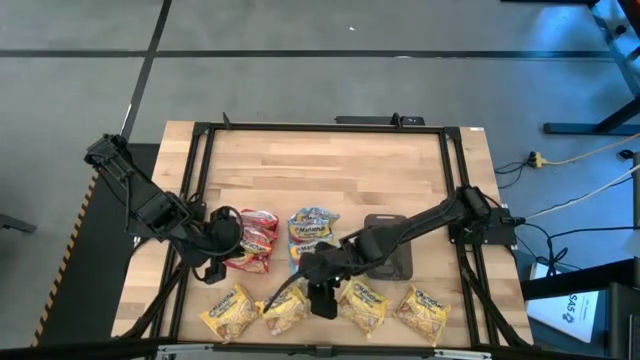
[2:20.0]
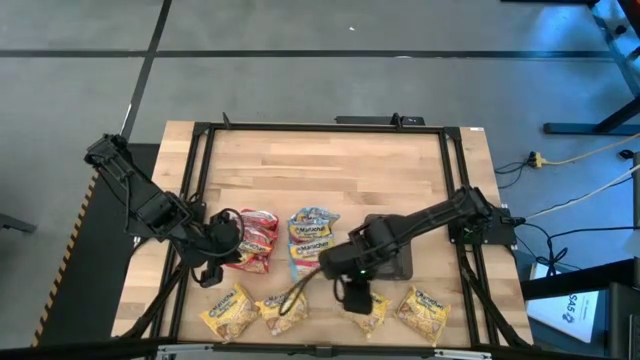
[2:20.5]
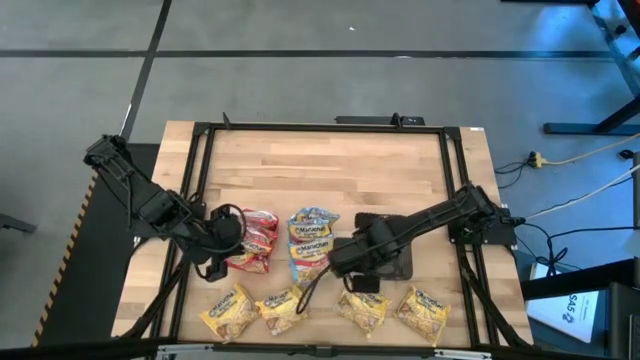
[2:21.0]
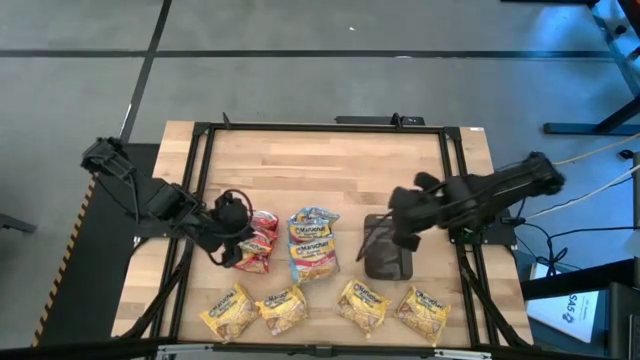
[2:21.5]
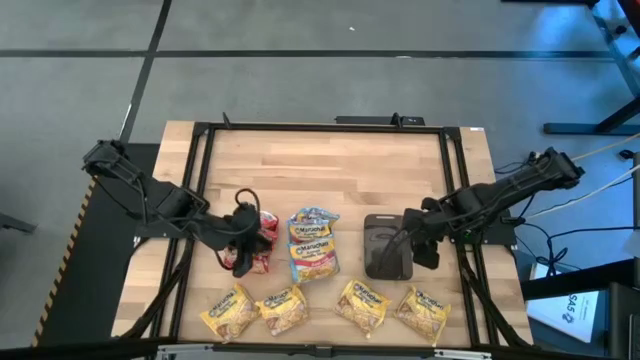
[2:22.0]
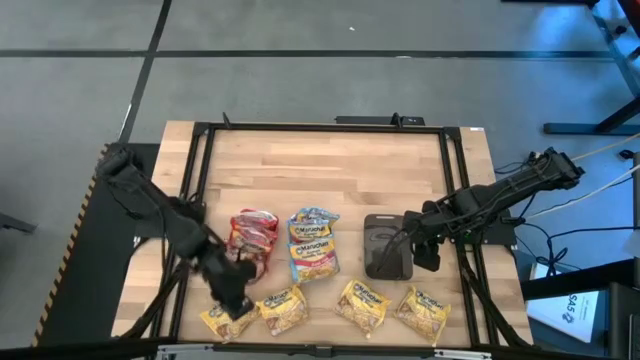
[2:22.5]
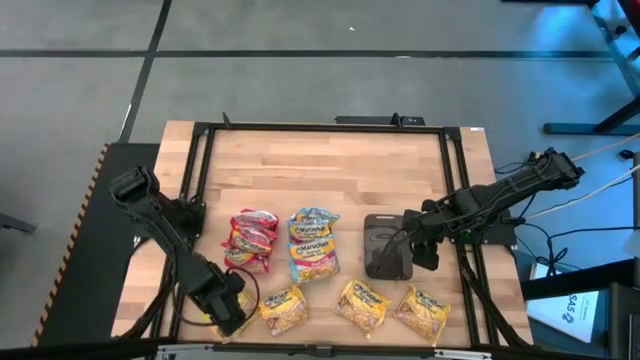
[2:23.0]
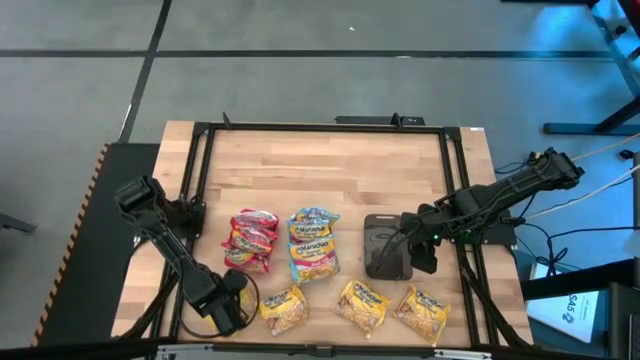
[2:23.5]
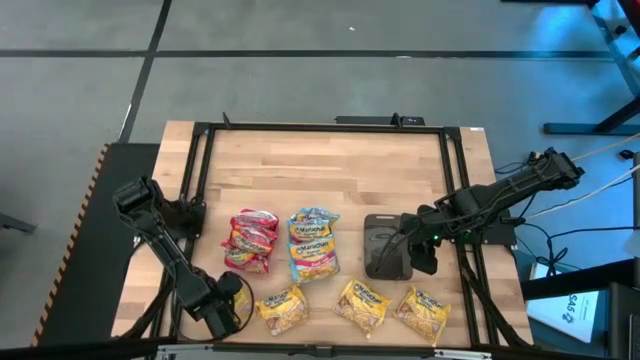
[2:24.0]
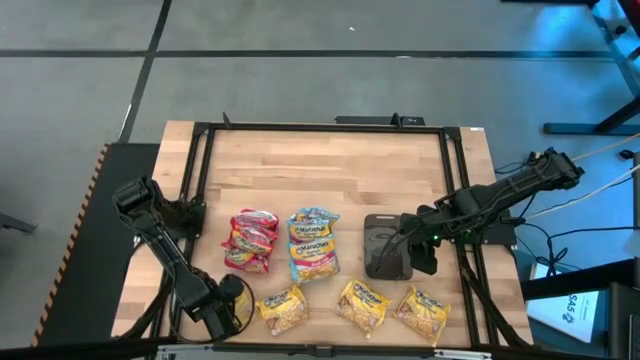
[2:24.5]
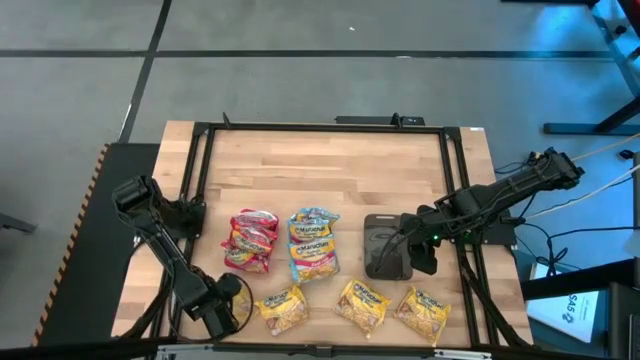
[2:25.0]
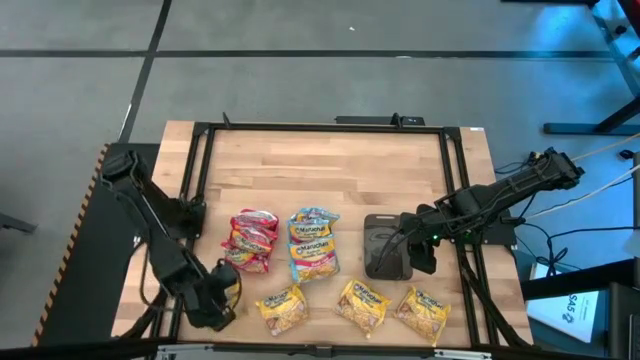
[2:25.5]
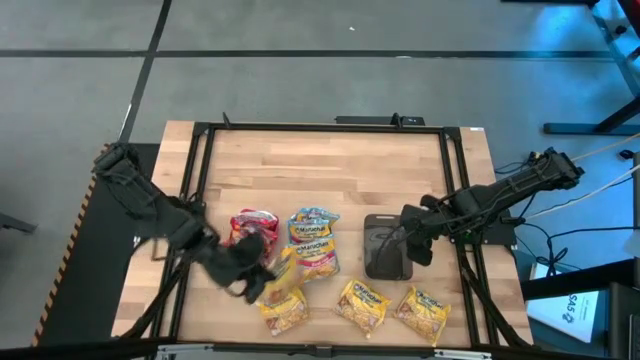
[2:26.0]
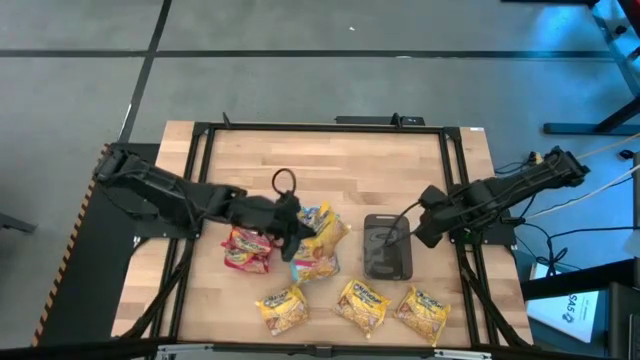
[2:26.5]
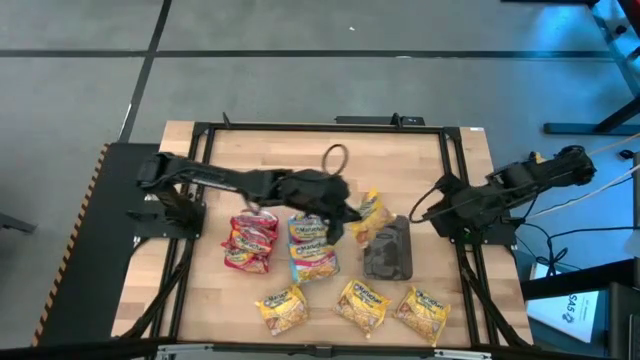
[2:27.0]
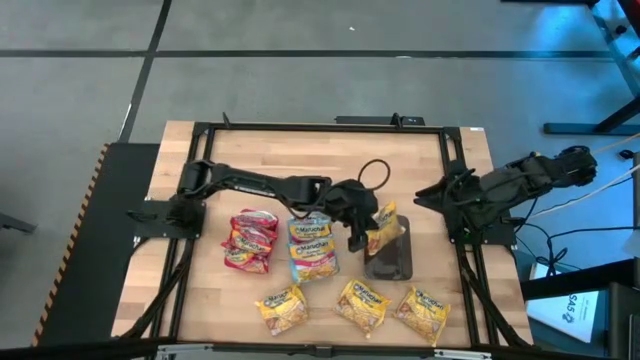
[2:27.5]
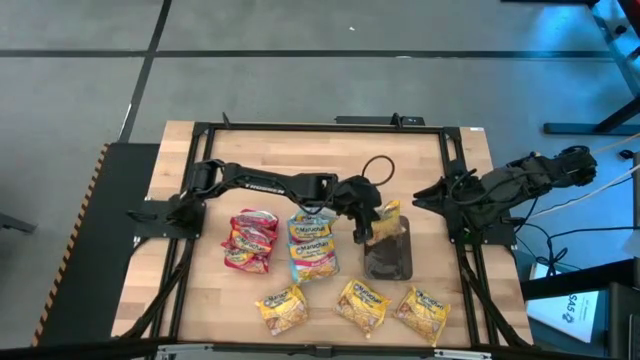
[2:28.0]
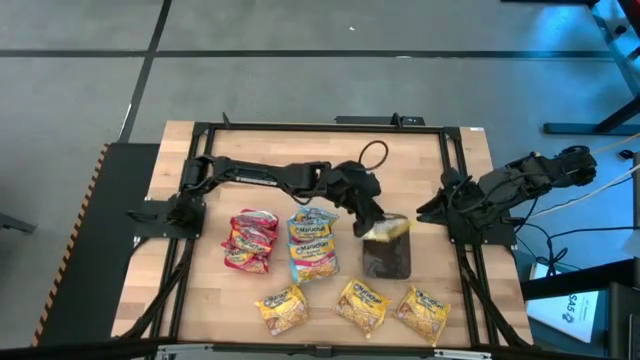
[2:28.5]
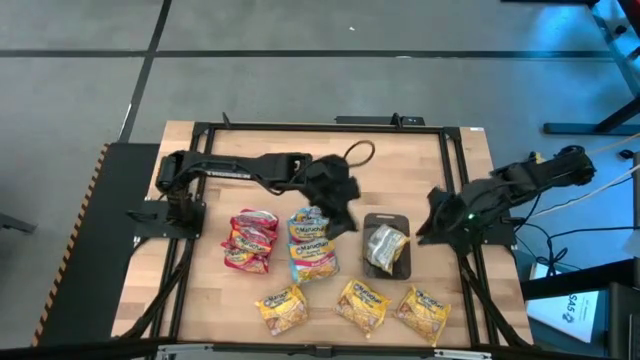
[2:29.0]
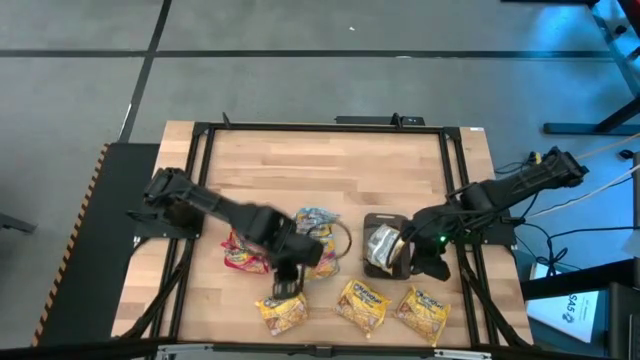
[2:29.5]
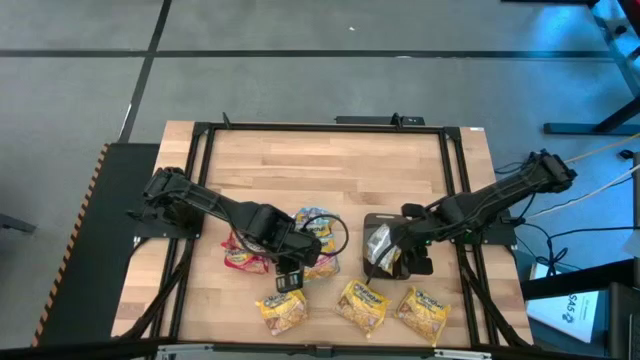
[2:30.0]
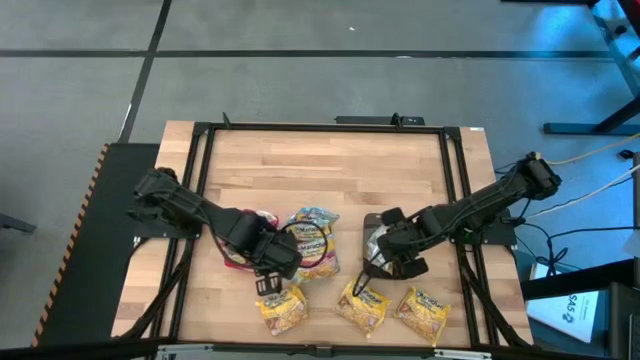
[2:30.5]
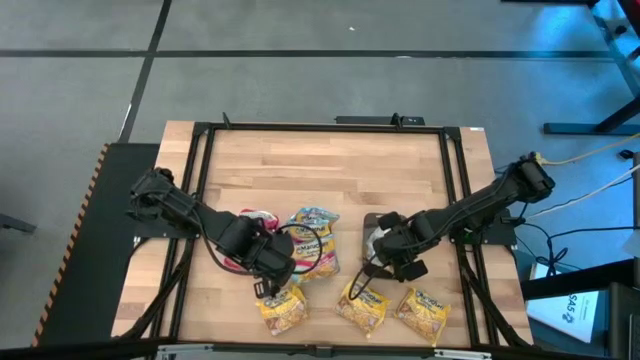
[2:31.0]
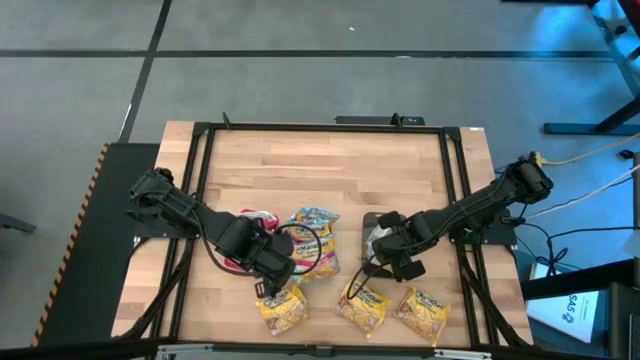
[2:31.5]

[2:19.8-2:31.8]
Task: Sort Maruchan noodles
Put the yellow noodle pack into the black bin

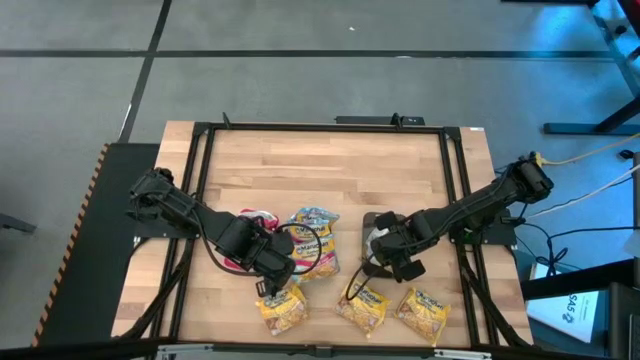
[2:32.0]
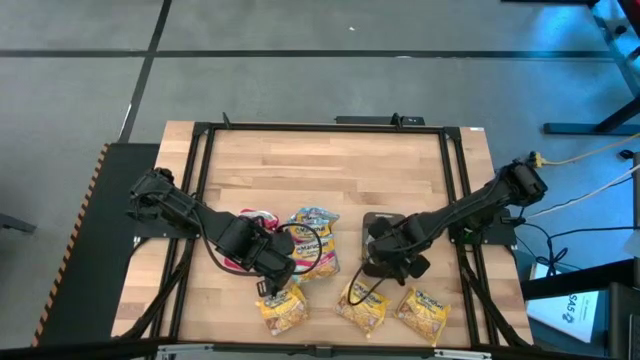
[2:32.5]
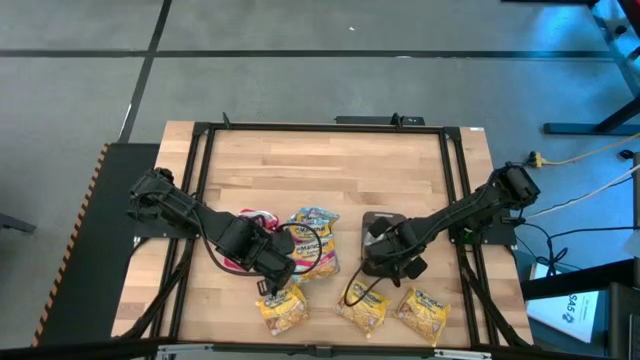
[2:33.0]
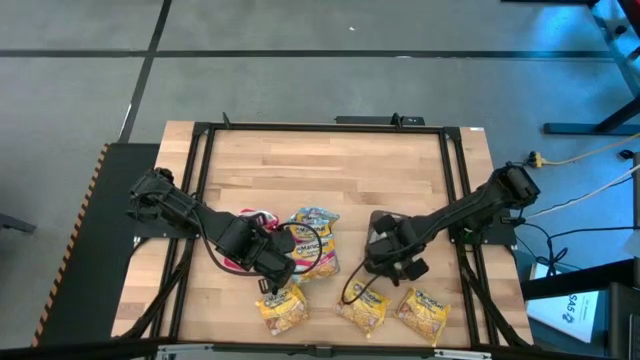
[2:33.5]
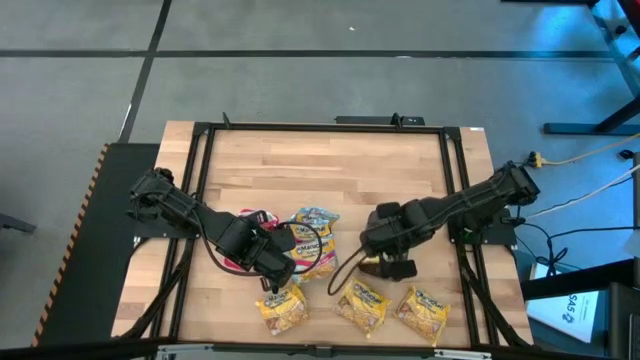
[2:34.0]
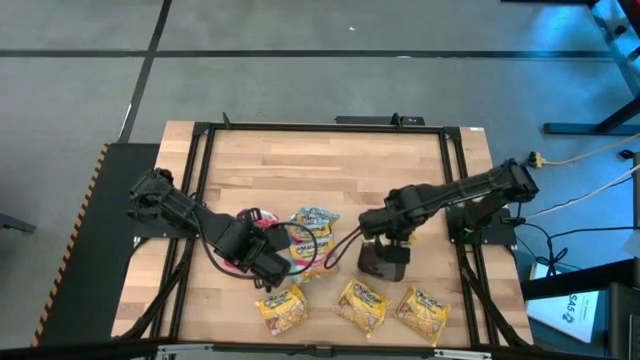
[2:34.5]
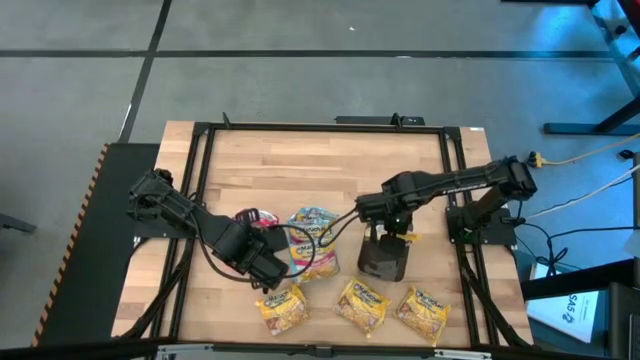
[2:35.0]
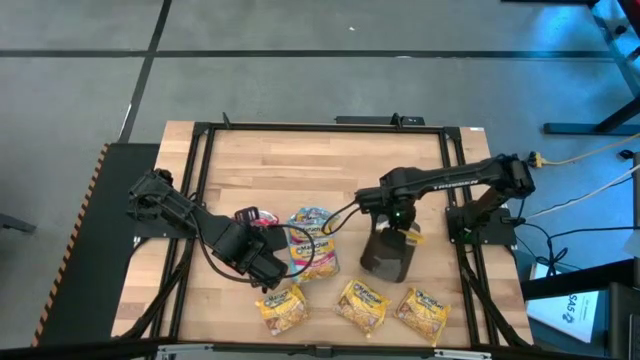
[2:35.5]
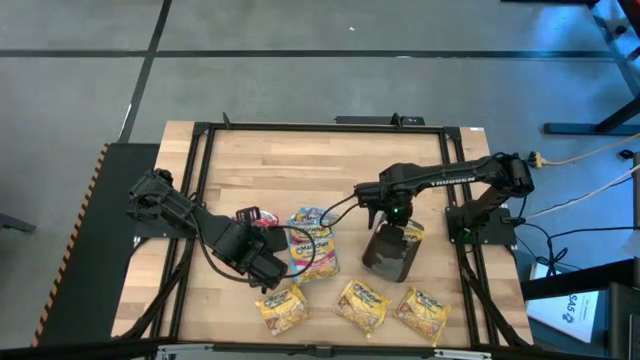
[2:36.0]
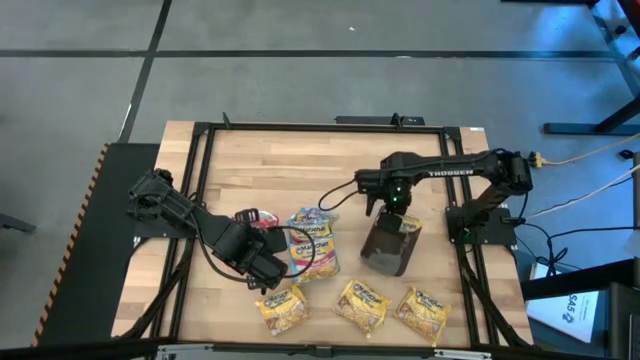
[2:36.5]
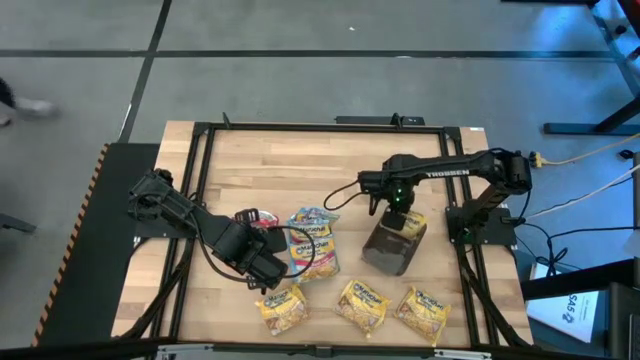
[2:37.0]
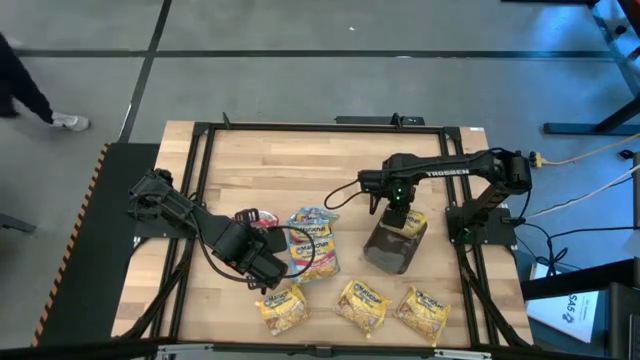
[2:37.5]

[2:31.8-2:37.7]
Put the yellow noodle pack into the black bin

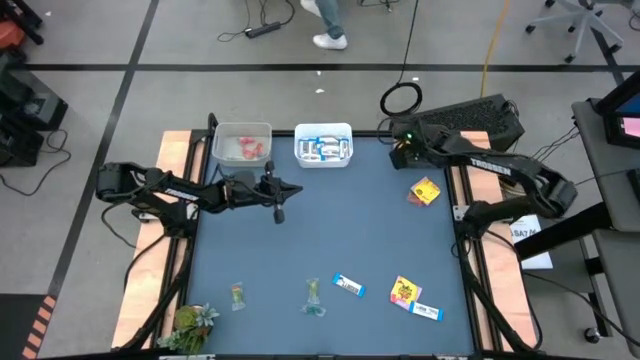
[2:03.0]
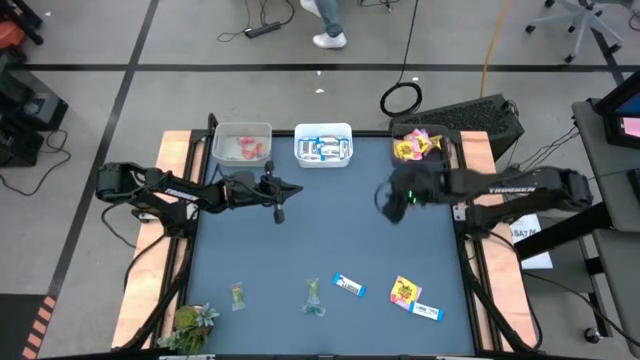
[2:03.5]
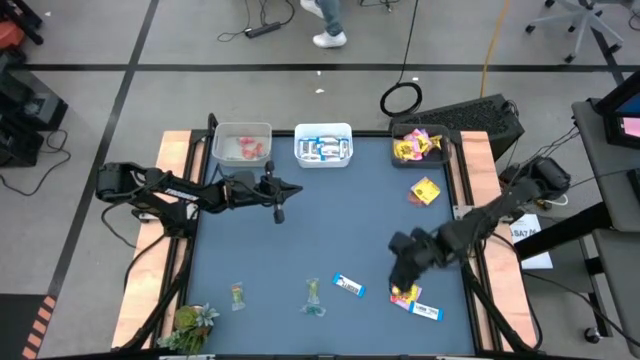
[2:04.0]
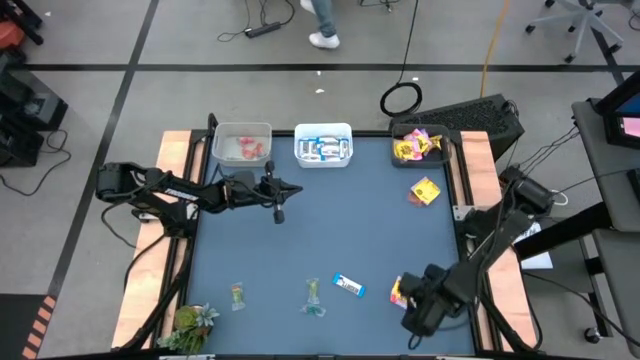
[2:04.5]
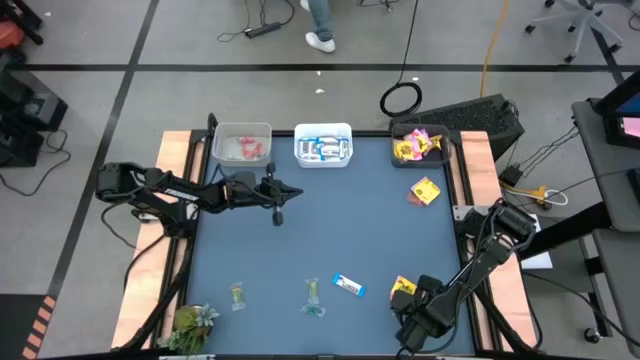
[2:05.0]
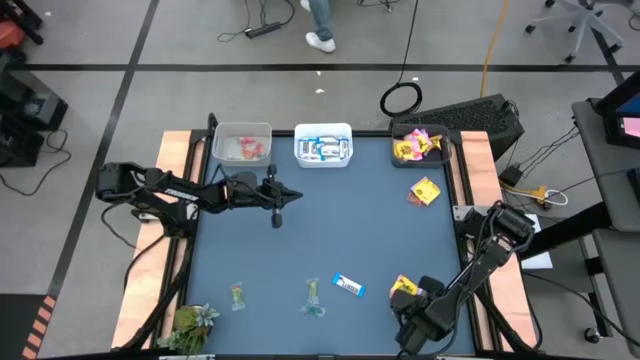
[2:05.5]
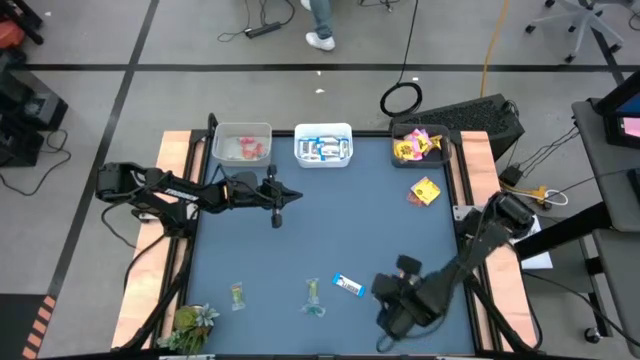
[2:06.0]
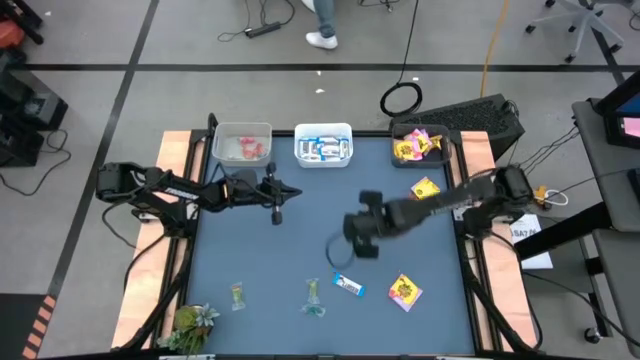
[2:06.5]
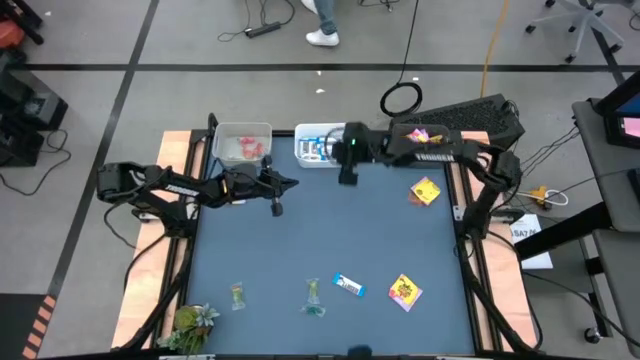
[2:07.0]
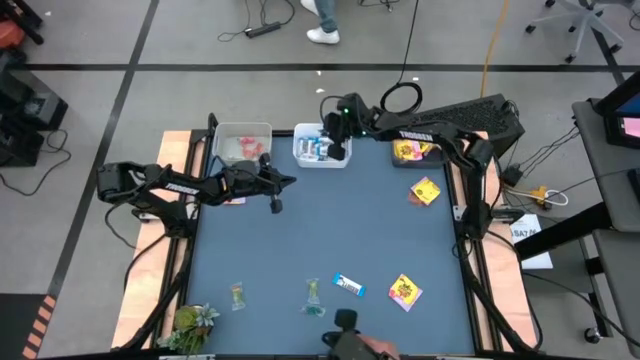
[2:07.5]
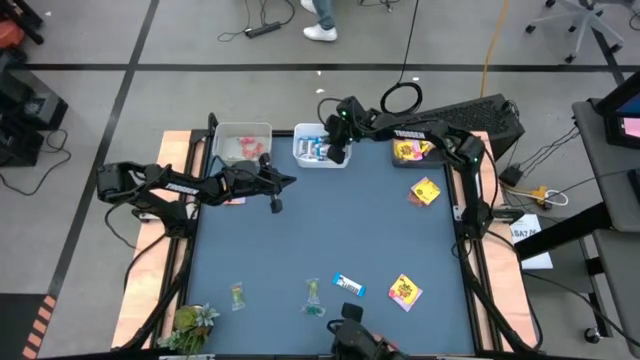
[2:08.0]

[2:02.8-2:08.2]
Task: Sort candy
Put the white chocolate into the white bin
